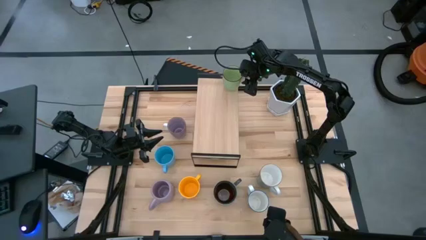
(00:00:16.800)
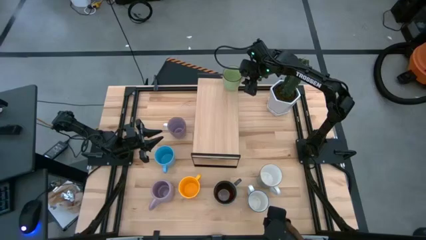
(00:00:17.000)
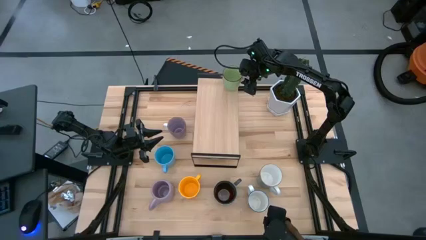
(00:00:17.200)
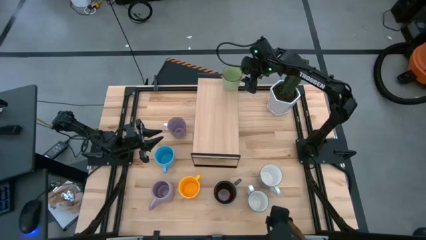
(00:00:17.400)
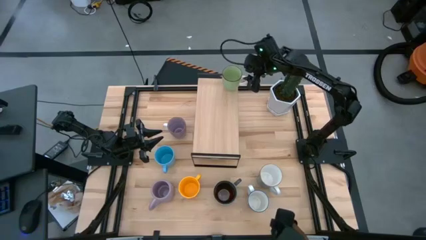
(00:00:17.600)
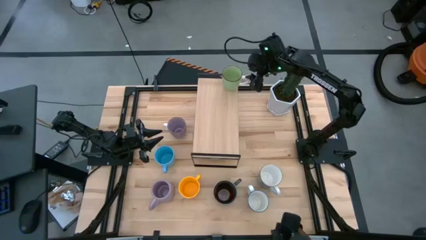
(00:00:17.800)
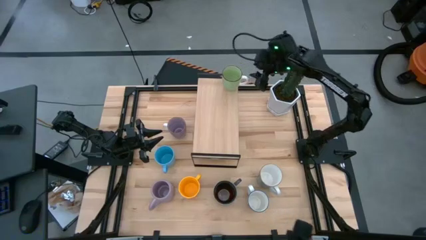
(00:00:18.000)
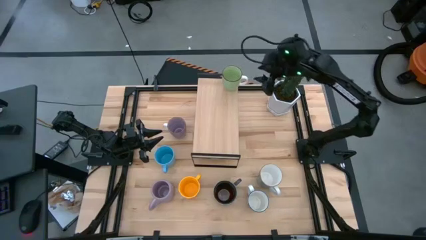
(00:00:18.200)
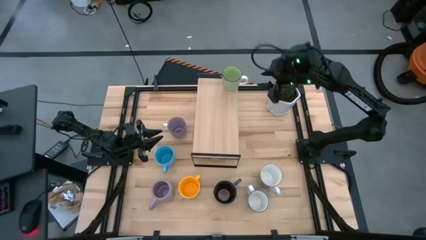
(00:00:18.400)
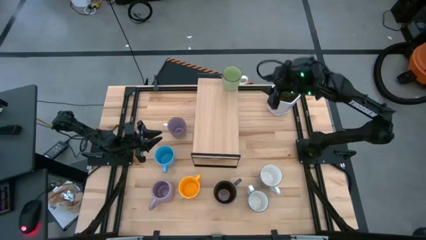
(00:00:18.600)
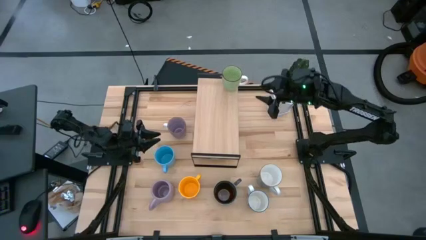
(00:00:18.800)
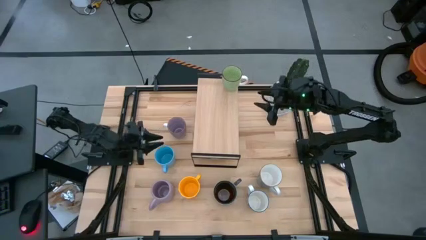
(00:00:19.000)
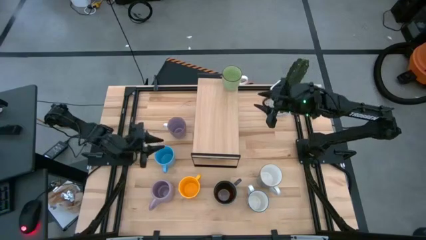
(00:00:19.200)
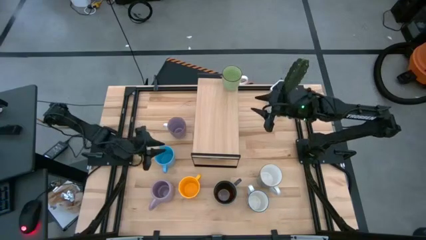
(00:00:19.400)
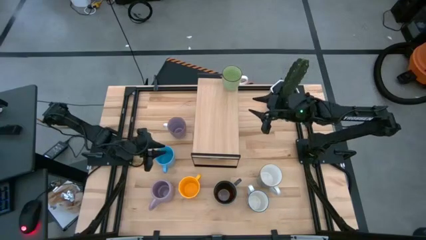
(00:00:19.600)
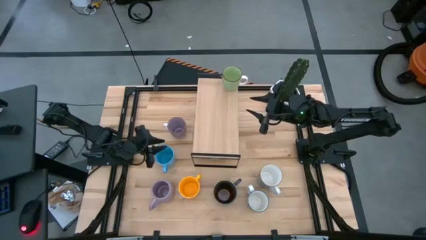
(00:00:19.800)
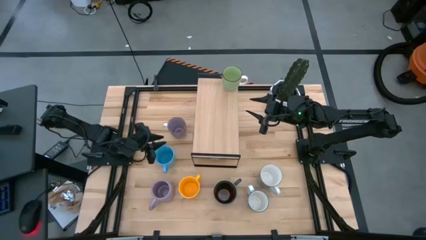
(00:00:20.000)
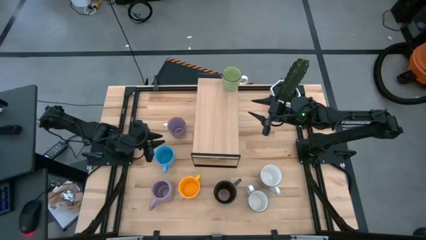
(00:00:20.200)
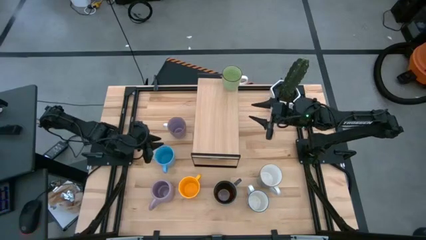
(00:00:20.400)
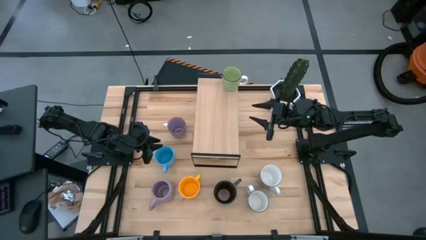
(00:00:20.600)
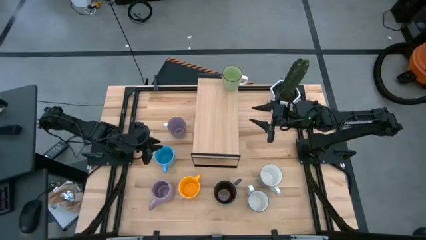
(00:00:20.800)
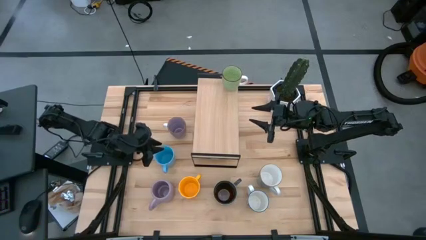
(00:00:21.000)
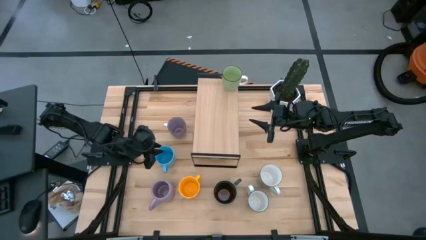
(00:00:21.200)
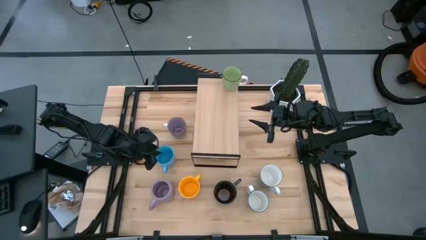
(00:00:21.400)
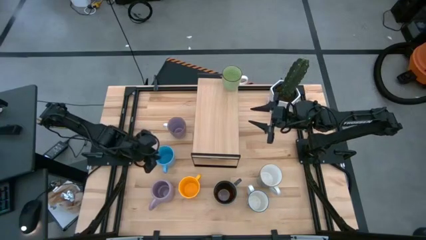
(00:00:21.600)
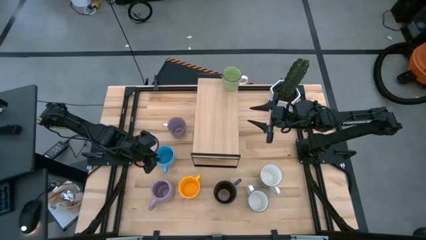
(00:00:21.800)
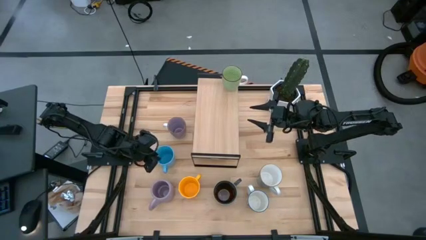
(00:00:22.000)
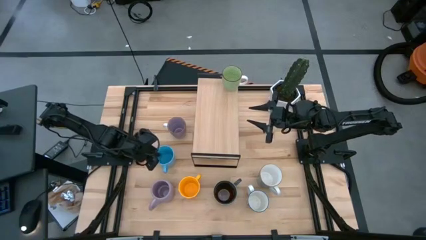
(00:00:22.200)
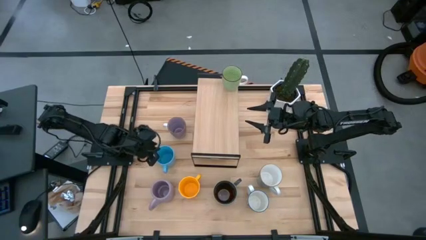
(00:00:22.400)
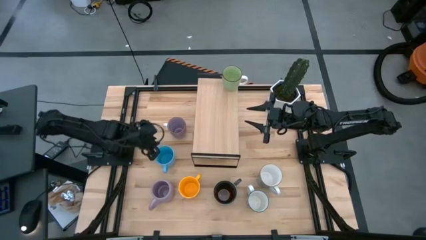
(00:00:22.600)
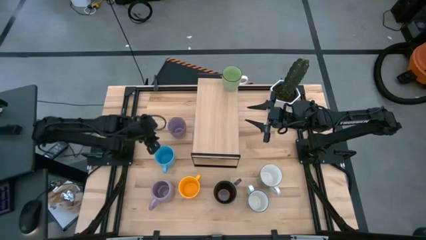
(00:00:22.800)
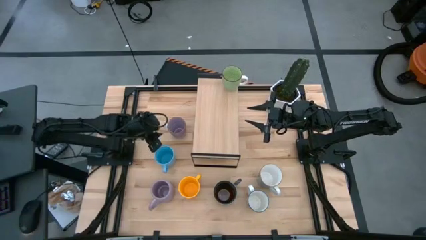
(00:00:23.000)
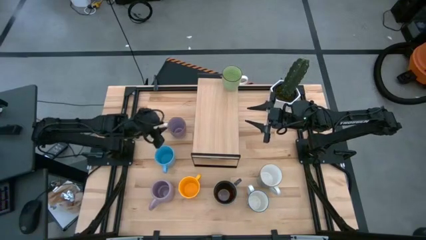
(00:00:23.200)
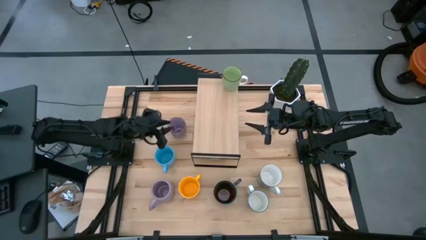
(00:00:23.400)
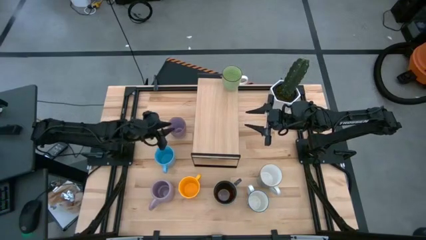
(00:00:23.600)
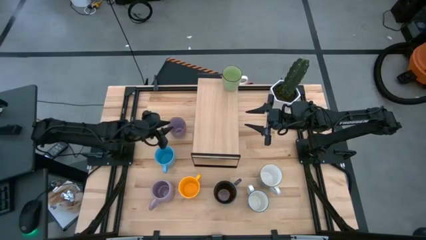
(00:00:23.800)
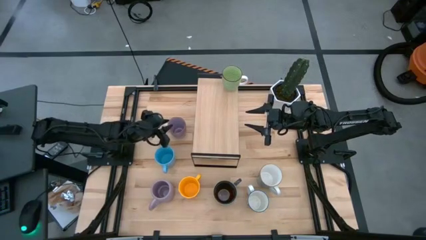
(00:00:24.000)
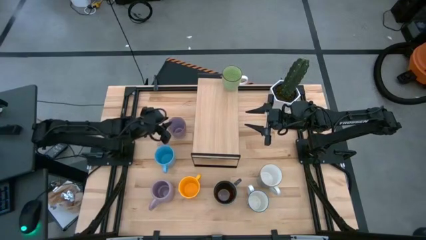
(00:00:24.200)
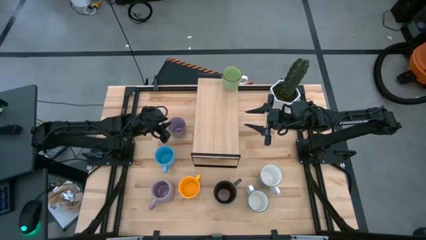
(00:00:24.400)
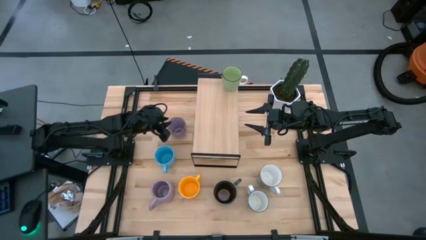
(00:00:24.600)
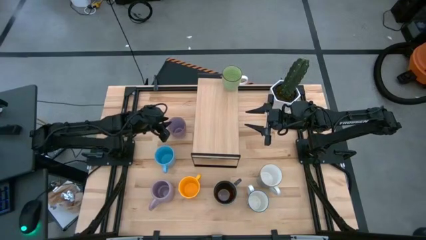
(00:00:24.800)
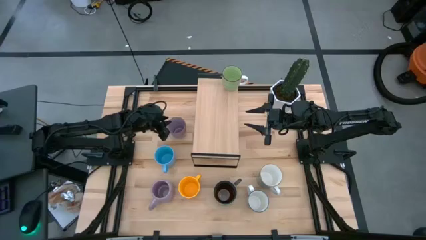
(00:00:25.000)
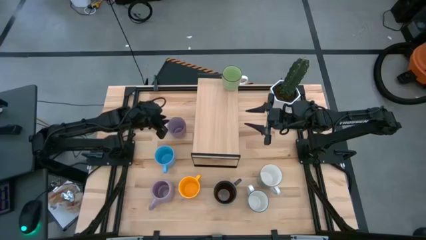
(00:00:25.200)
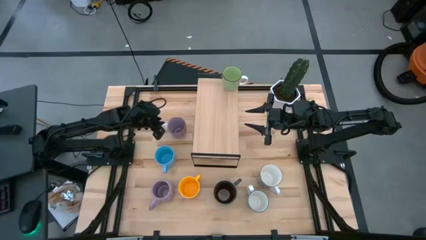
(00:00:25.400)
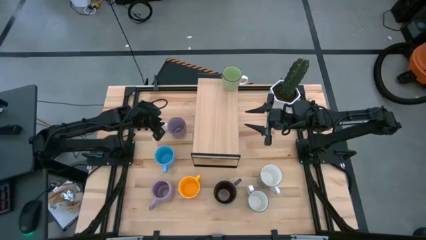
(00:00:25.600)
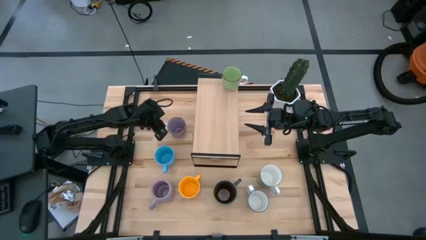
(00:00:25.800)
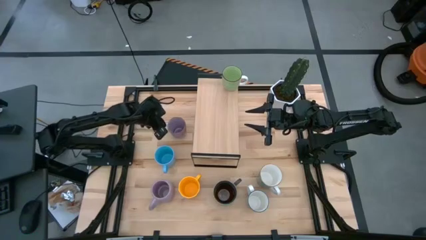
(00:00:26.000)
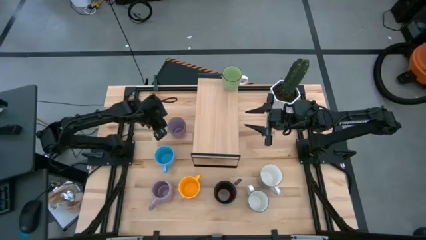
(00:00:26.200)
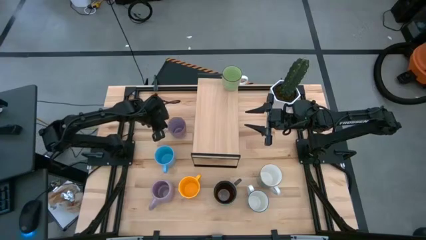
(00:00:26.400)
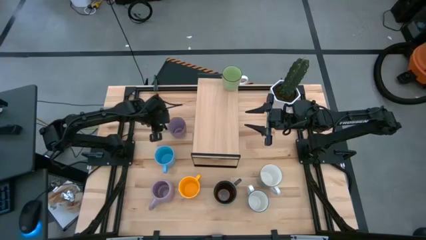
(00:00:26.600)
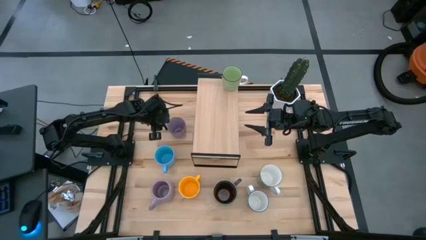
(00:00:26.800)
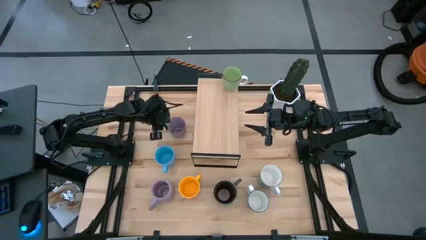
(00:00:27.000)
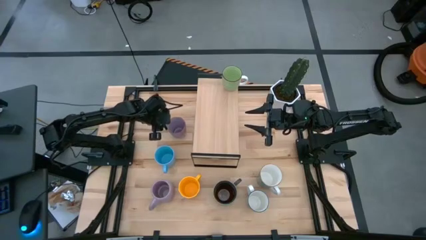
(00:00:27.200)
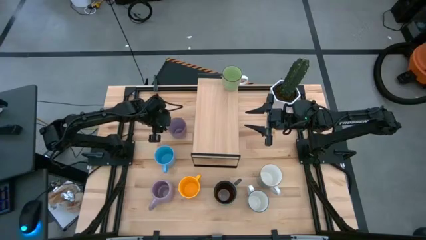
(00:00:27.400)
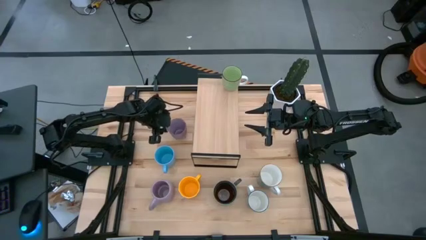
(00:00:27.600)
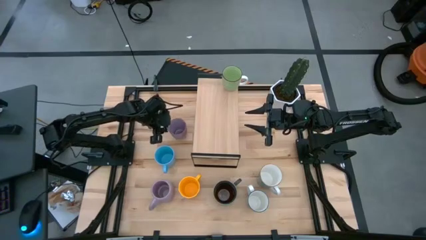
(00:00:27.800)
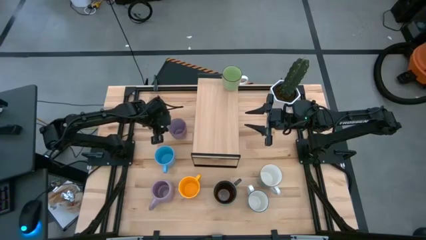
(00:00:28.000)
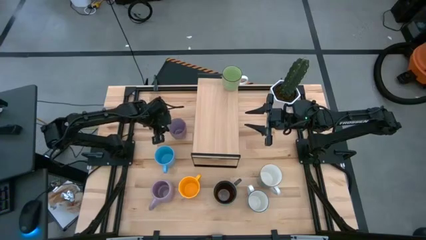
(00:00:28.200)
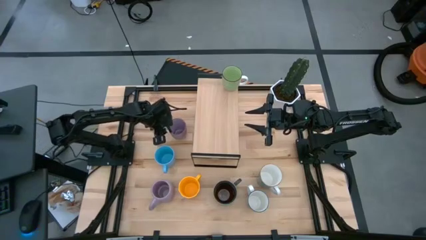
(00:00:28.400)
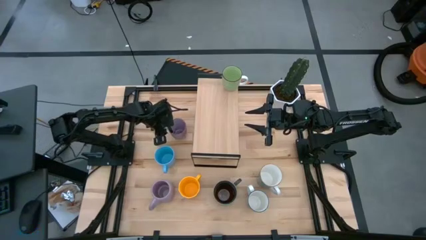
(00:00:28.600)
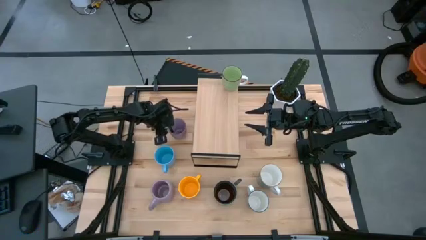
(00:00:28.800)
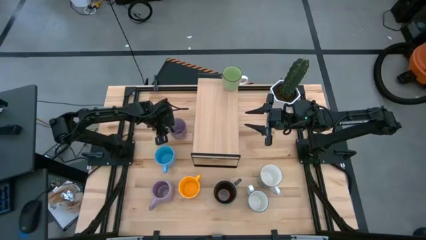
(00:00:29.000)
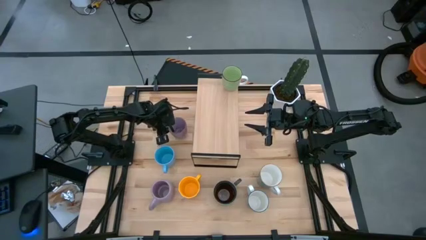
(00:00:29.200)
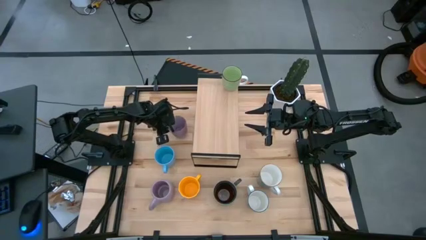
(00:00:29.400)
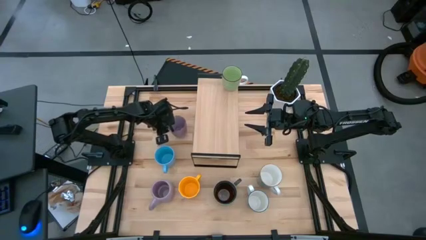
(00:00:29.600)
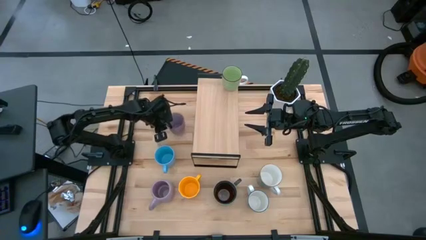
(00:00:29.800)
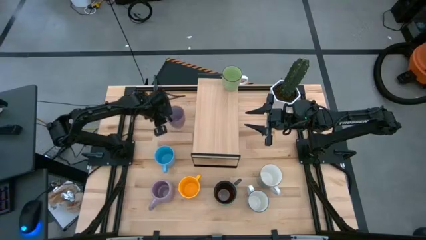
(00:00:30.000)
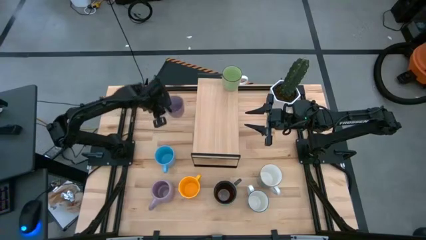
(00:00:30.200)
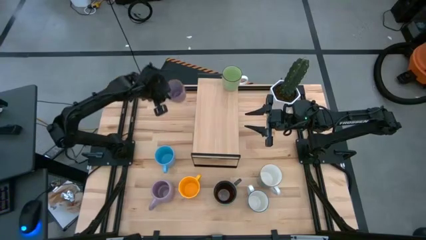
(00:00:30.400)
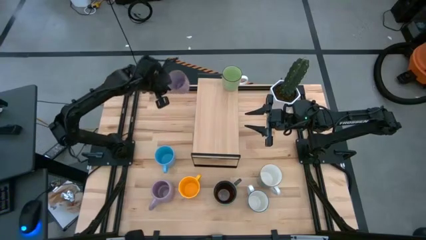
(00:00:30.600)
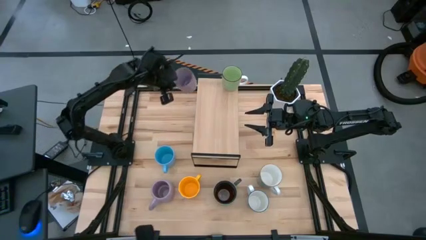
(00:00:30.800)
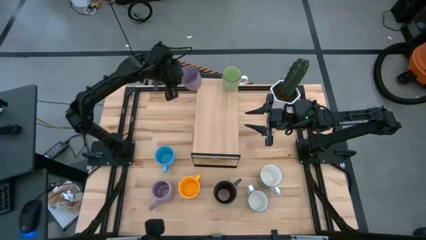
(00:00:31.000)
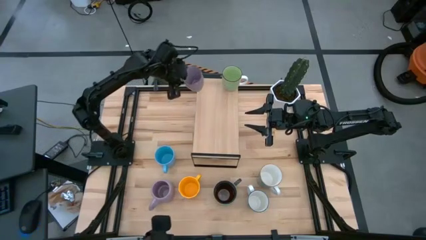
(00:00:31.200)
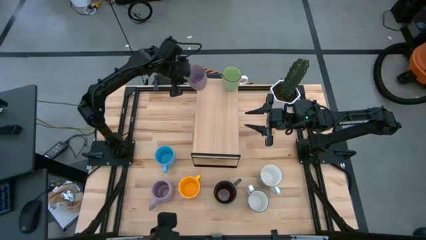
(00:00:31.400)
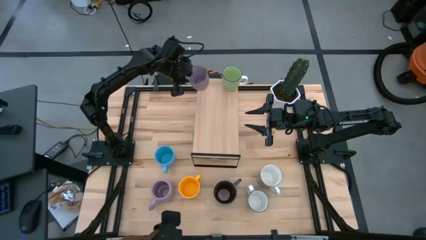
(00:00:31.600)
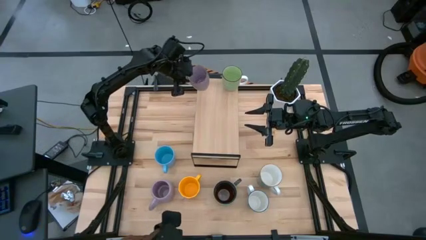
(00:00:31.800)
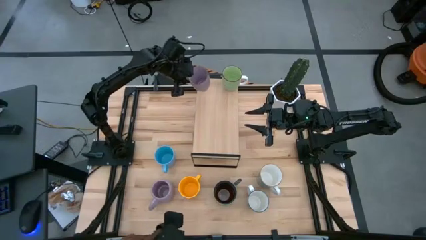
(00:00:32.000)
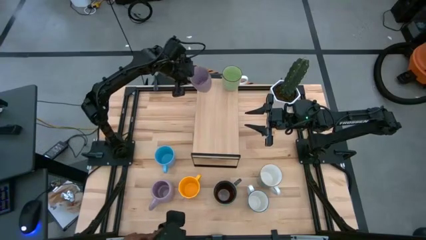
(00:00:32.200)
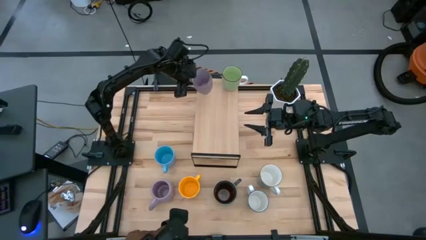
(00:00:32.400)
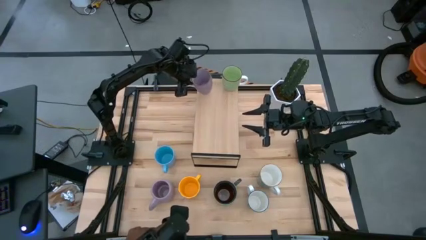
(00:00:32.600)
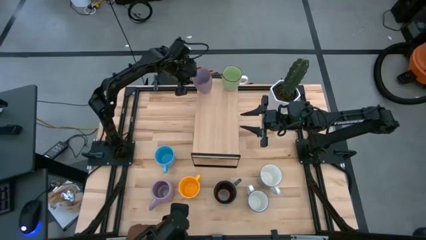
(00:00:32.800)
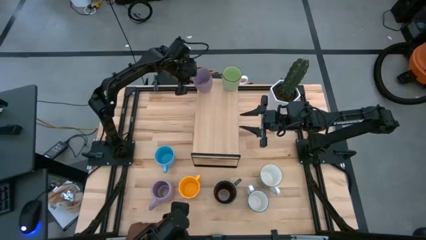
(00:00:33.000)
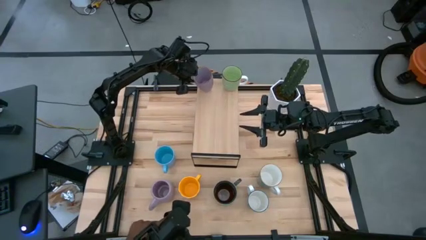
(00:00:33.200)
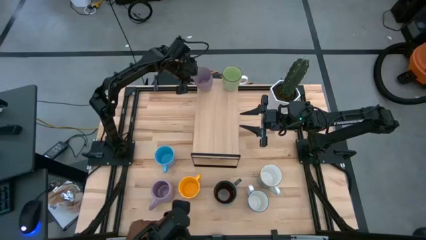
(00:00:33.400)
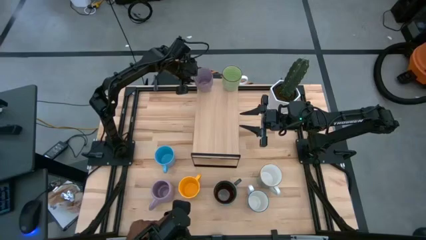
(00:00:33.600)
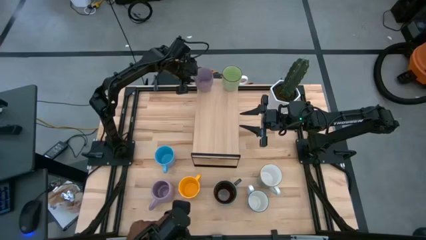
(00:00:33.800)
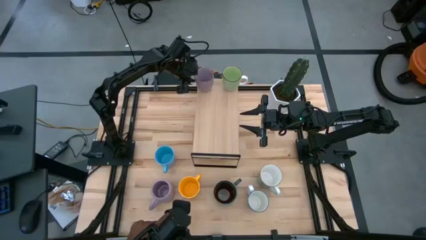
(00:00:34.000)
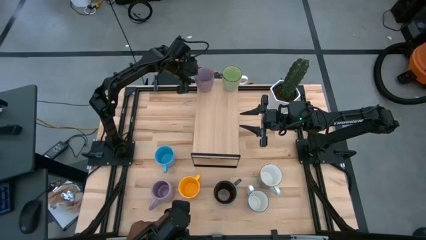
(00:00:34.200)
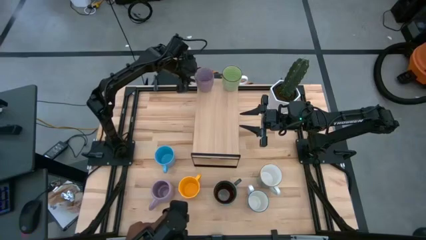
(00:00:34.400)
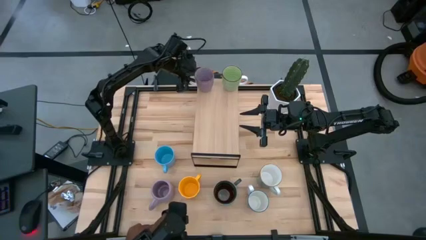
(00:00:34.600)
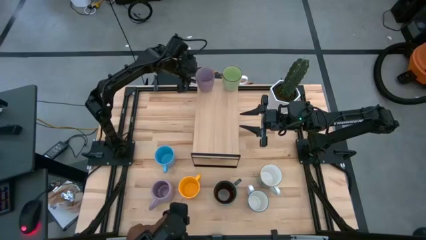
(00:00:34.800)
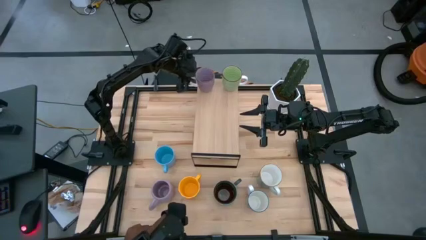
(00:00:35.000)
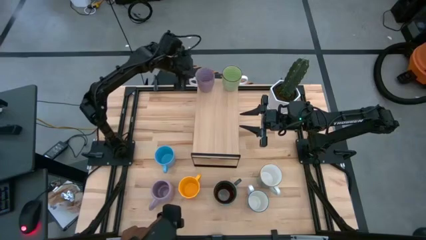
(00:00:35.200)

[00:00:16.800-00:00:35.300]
Task: Place coffee mugs
Put the purple patterned mug on the shelf
